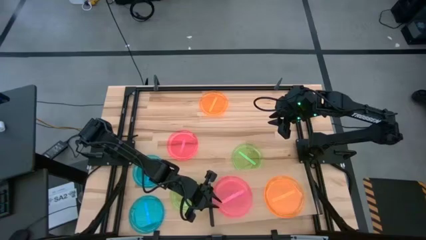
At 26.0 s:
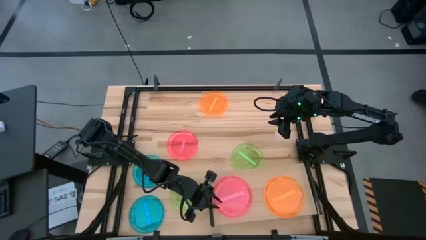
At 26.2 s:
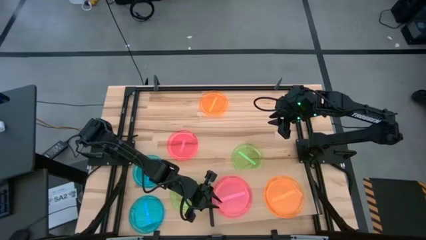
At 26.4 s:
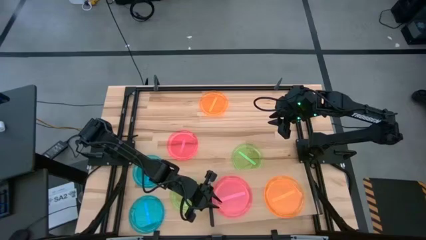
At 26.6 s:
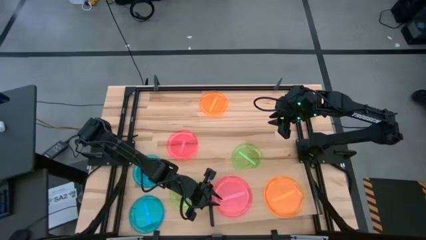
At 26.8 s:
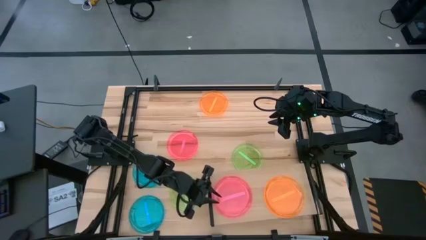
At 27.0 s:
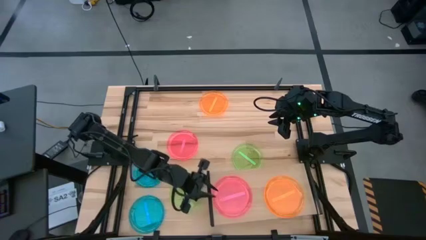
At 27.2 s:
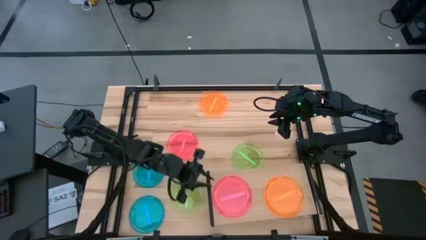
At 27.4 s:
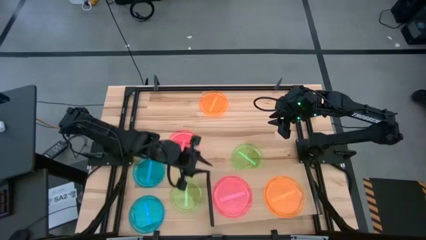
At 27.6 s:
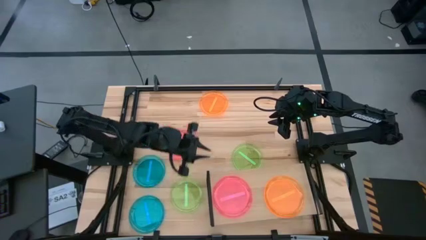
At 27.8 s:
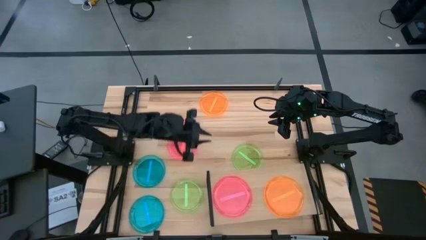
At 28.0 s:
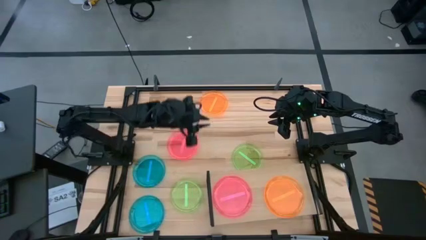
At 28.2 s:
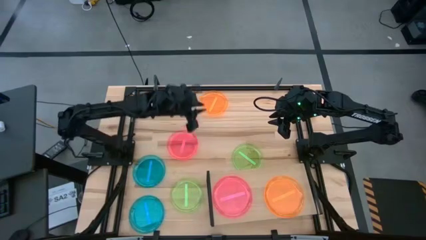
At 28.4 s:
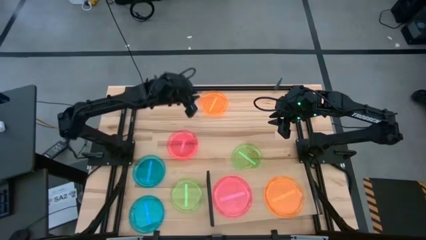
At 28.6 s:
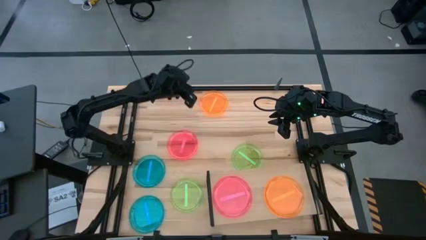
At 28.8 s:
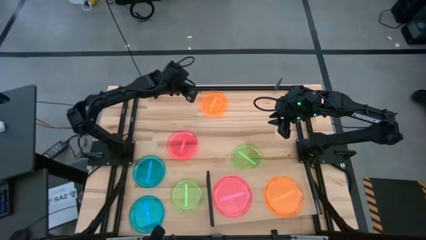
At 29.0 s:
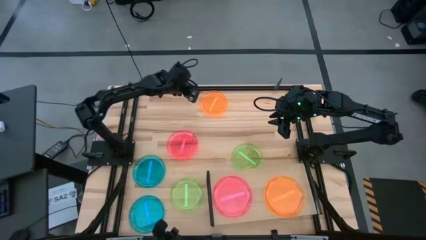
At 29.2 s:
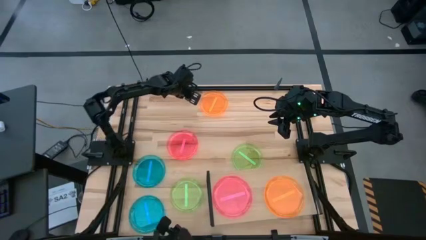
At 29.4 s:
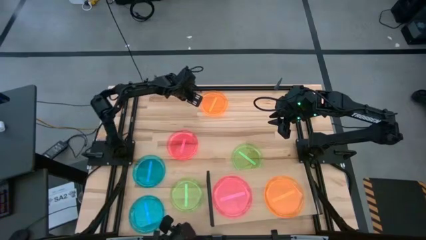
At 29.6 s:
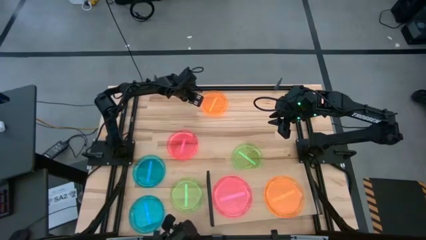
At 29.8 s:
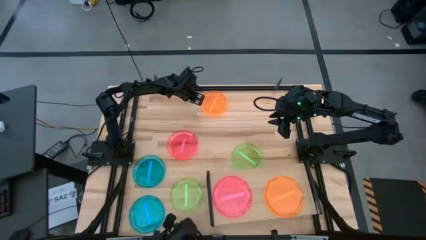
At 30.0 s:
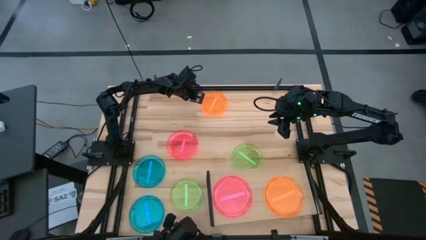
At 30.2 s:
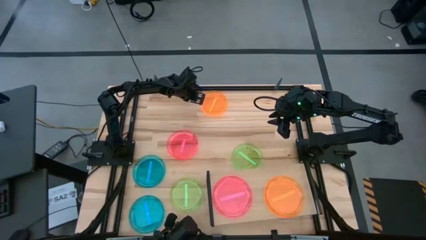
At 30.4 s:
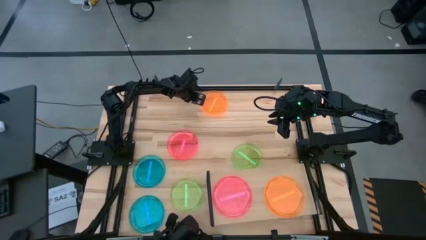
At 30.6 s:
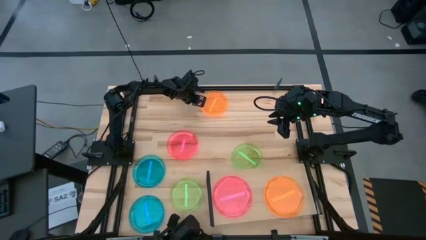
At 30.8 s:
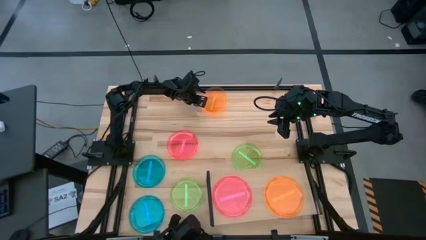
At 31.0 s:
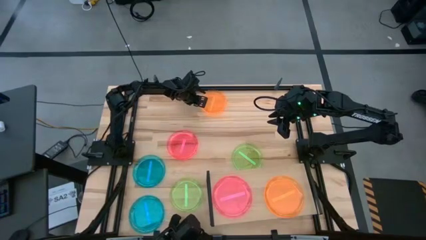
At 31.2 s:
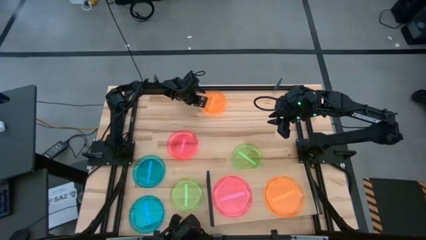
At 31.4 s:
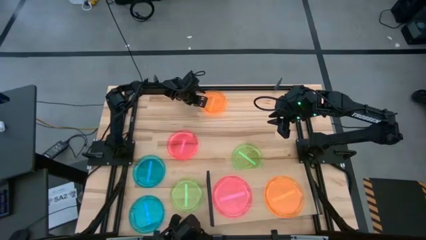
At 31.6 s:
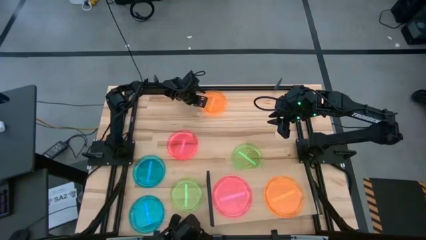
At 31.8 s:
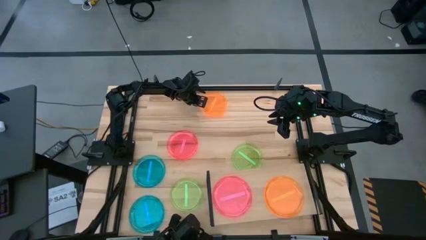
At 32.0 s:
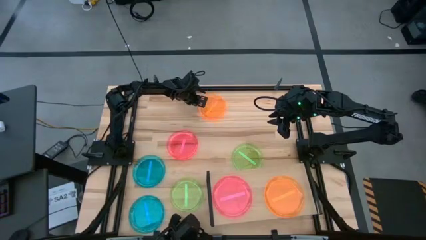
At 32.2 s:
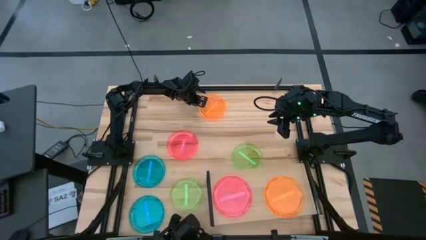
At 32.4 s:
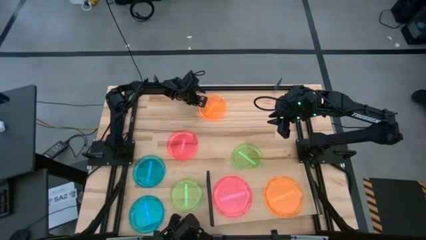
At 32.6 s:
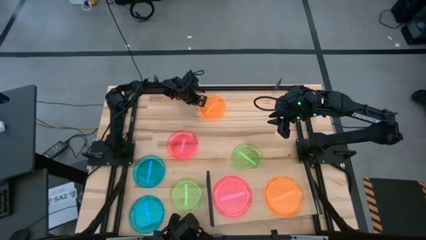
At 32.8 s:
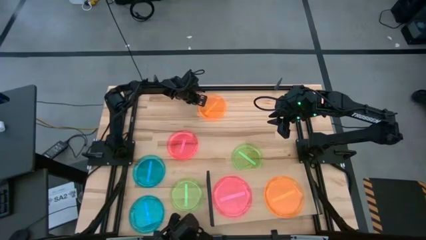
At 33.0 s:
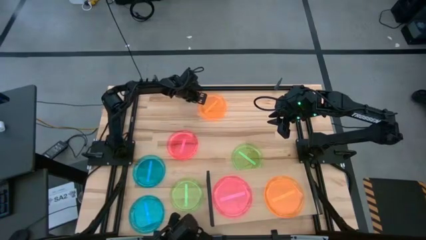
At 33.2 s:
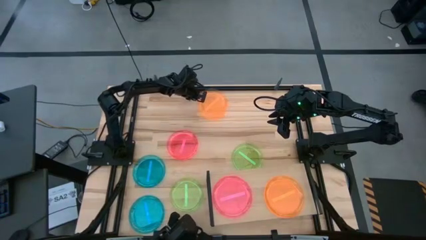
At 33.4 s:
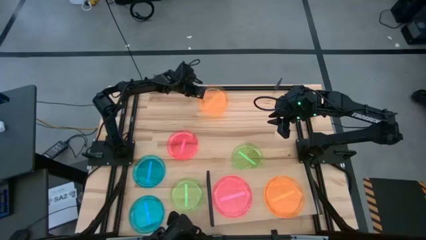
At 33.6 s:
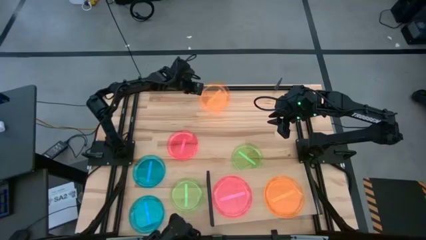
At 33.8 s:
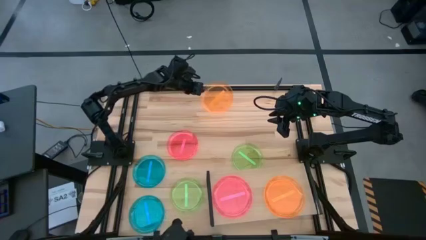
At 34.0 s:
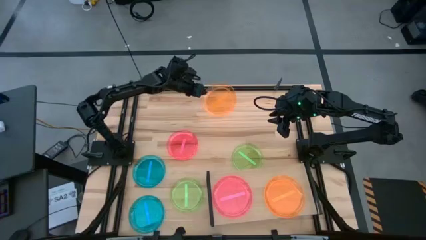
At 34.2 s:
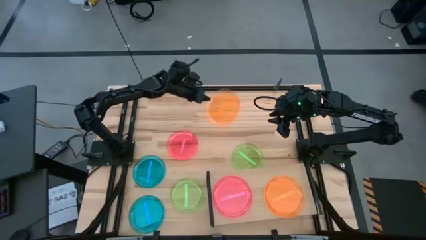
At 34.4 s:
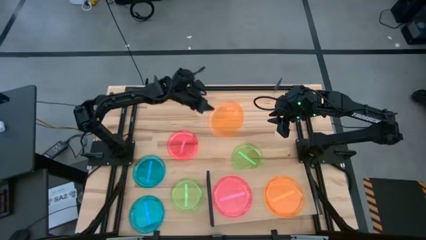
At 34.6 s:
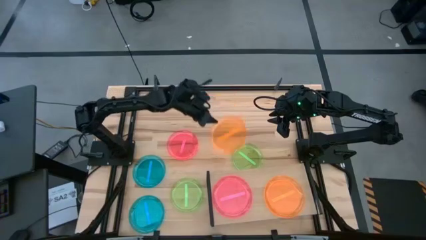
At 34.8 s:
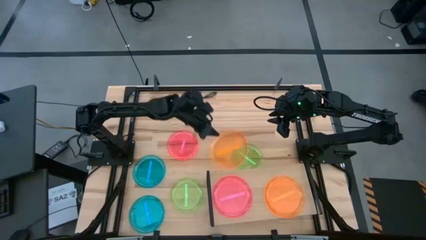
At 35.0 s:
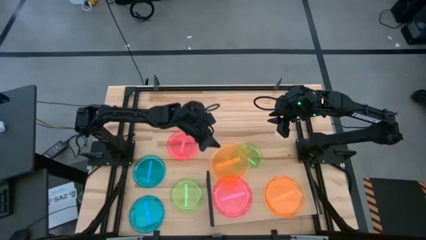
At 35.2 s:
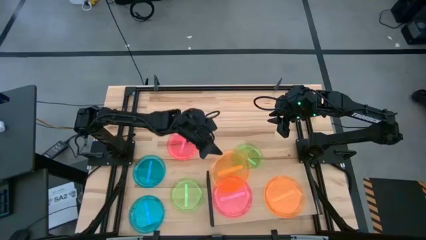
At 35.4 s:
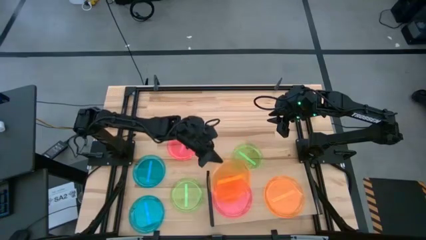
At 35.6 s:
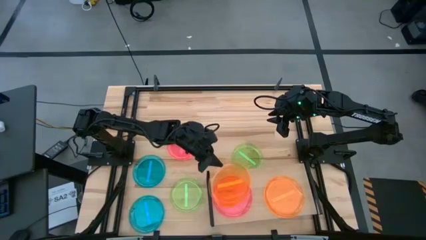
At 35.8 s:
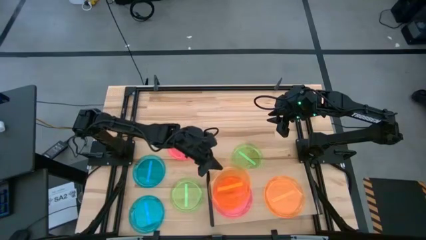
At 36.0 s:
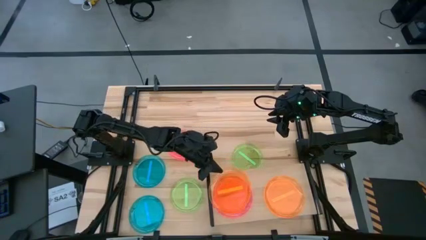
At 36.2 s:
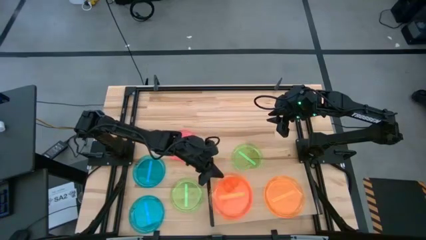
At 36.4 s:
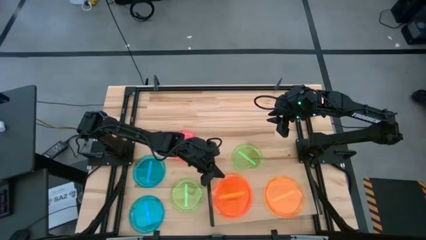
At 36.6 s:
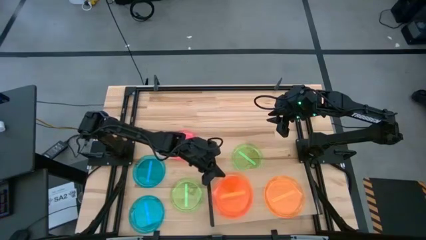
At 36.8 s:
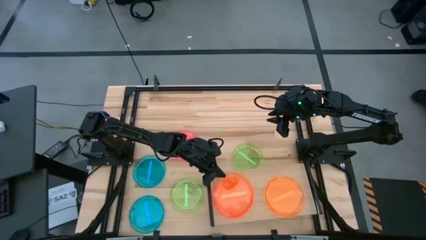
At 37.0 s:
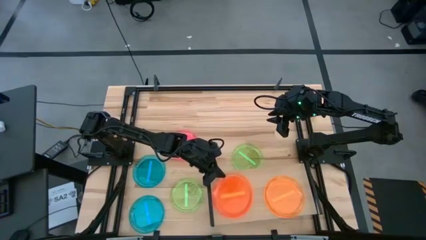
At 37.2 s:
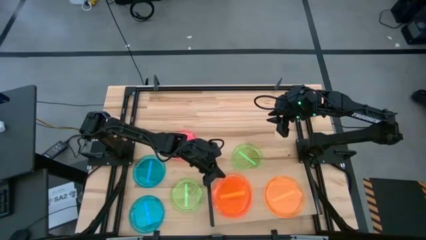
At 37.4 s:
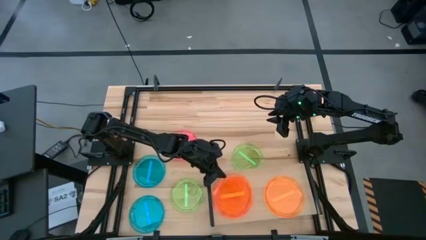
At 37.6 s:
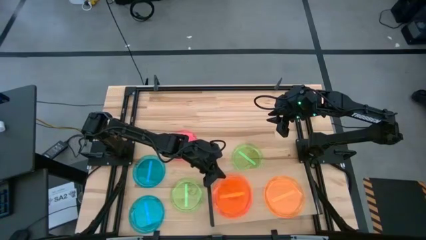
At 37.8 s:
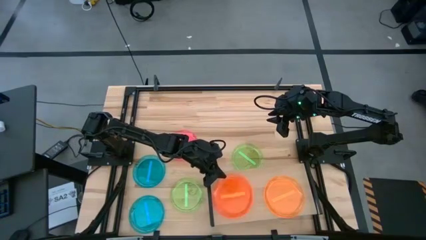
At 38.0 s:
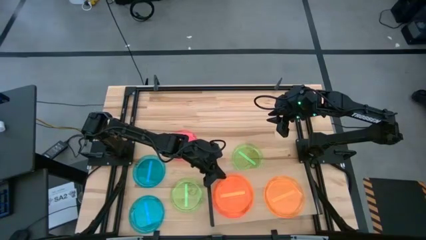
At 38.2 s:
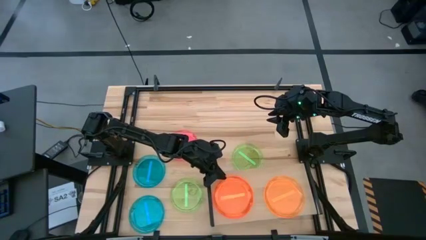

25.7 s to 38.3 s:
Task: Place and stack plates onto a shelf
Stack the orange plate on the pink plate on the shelf
